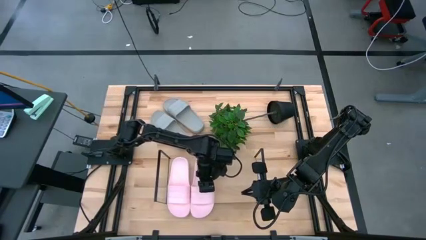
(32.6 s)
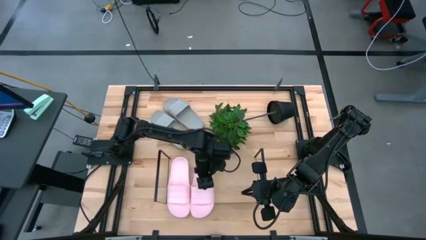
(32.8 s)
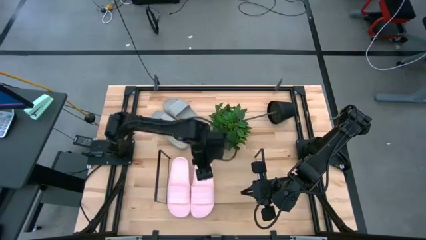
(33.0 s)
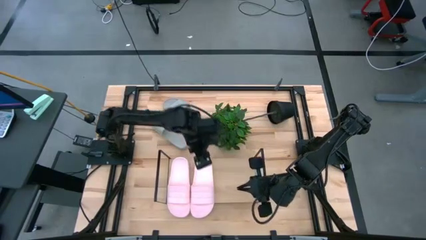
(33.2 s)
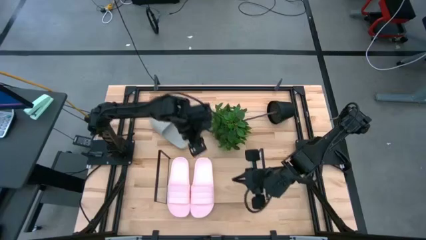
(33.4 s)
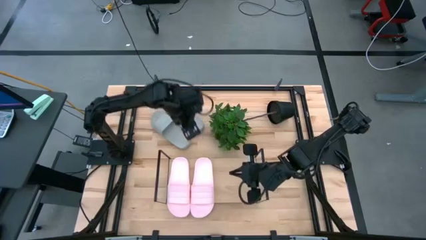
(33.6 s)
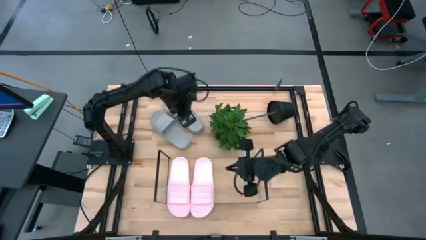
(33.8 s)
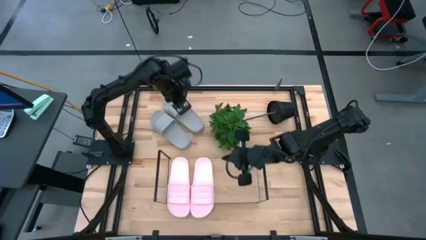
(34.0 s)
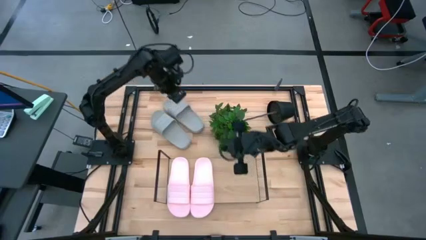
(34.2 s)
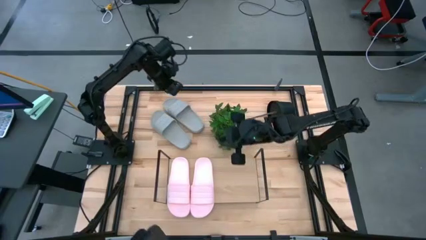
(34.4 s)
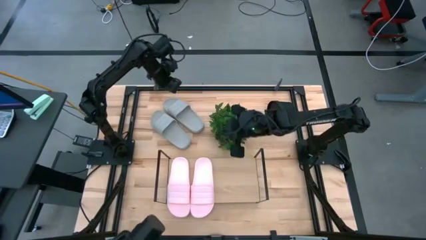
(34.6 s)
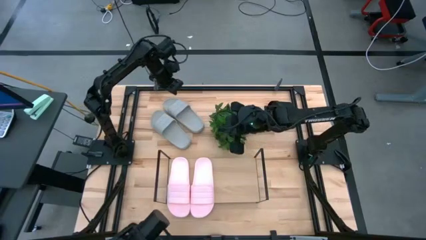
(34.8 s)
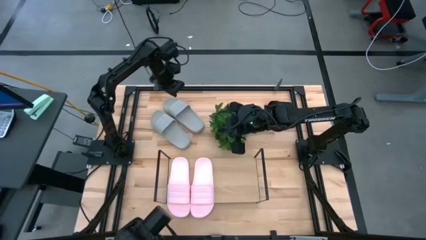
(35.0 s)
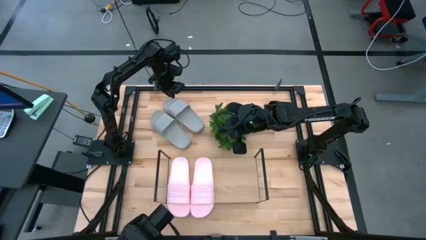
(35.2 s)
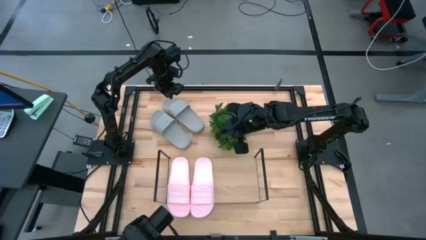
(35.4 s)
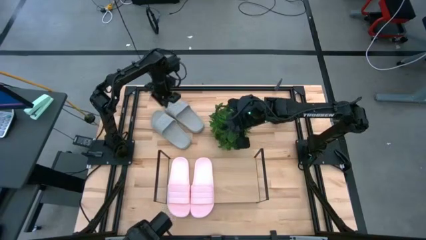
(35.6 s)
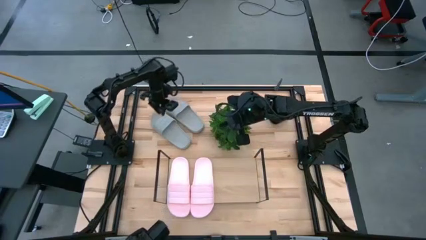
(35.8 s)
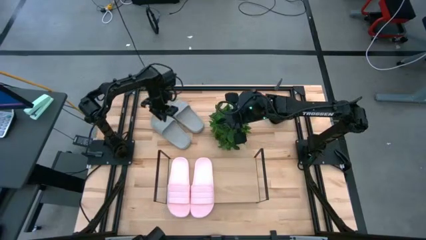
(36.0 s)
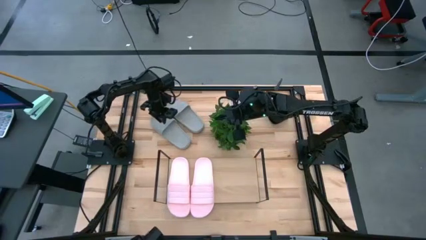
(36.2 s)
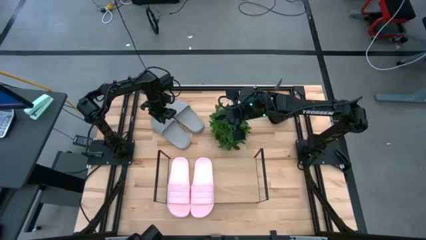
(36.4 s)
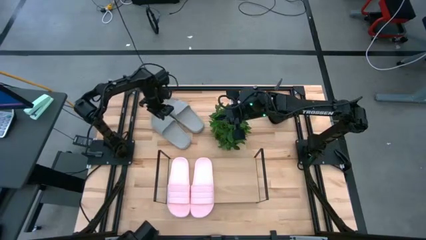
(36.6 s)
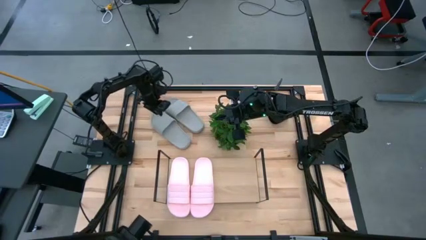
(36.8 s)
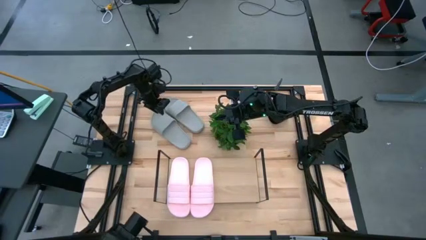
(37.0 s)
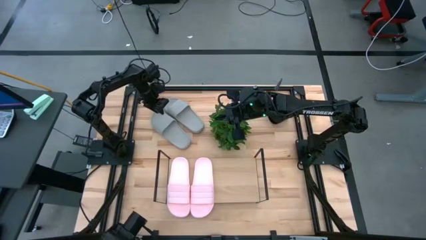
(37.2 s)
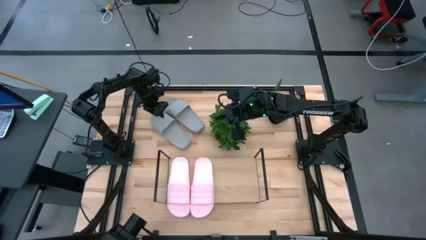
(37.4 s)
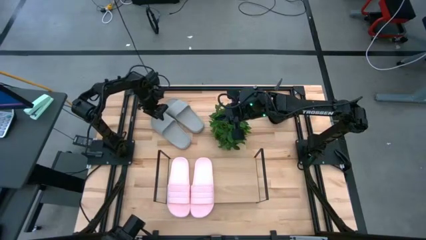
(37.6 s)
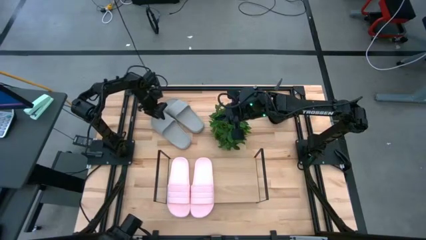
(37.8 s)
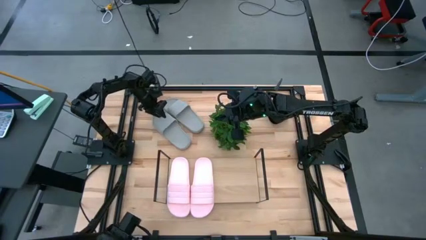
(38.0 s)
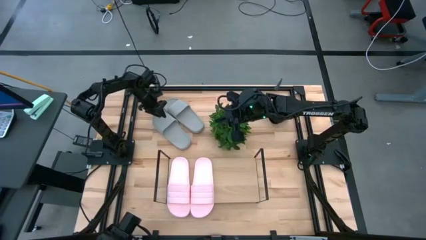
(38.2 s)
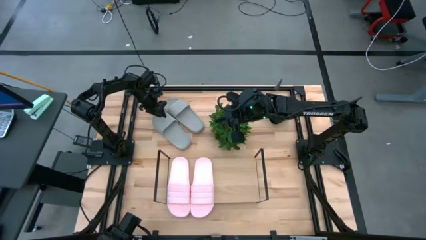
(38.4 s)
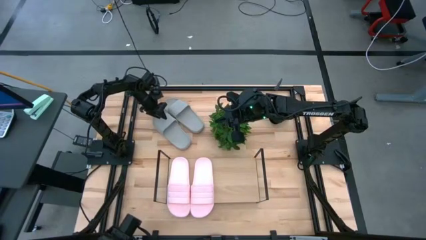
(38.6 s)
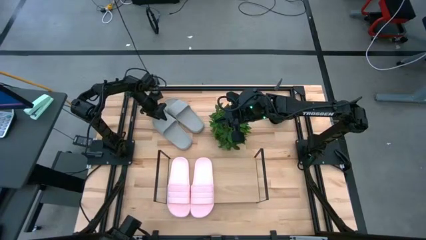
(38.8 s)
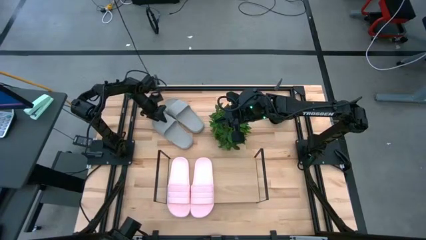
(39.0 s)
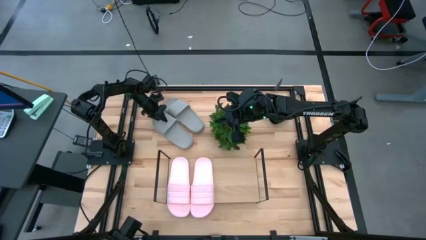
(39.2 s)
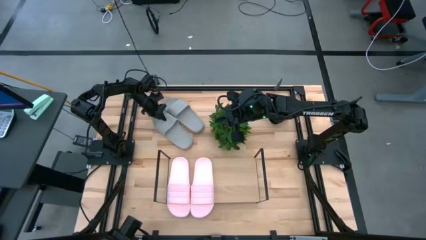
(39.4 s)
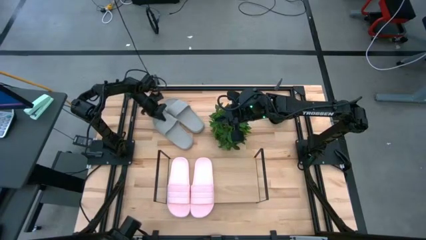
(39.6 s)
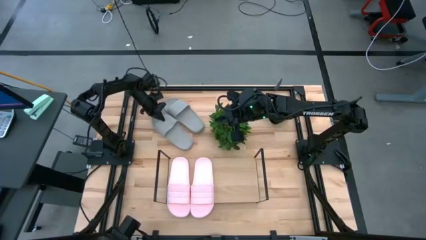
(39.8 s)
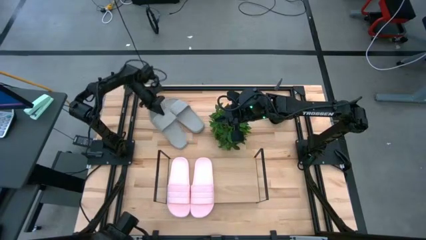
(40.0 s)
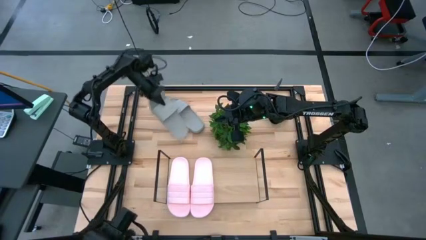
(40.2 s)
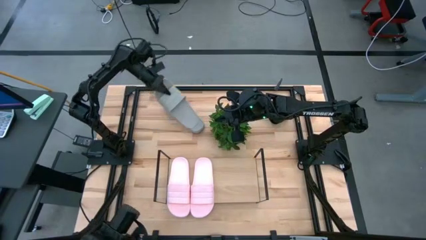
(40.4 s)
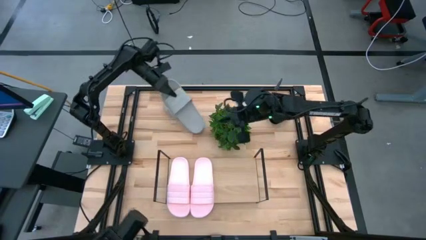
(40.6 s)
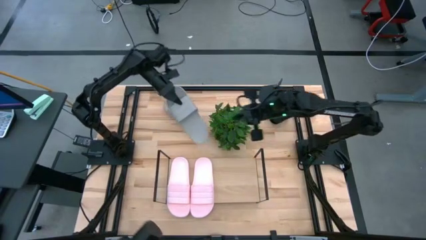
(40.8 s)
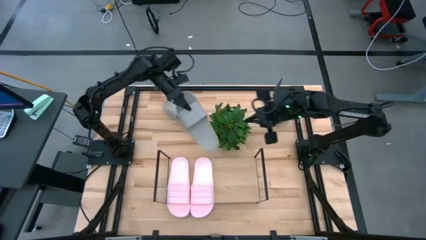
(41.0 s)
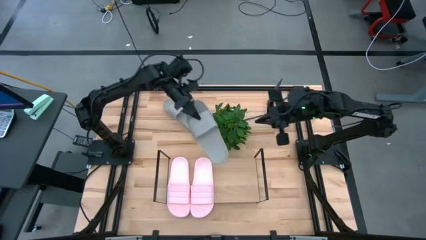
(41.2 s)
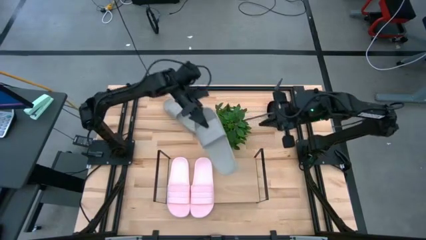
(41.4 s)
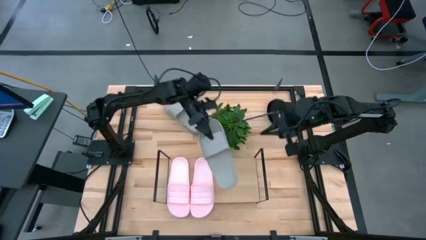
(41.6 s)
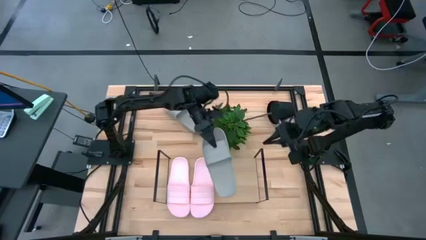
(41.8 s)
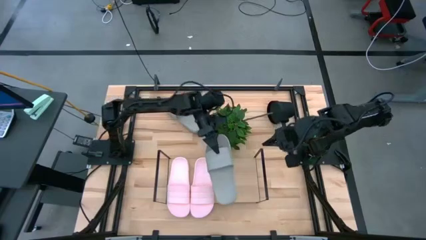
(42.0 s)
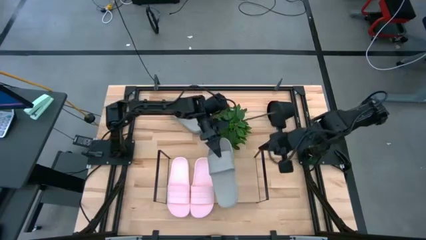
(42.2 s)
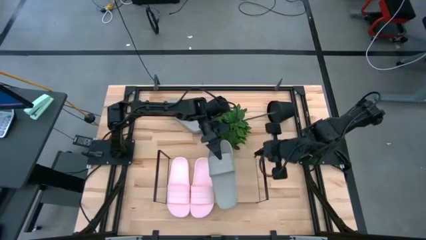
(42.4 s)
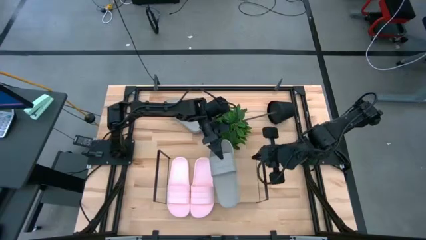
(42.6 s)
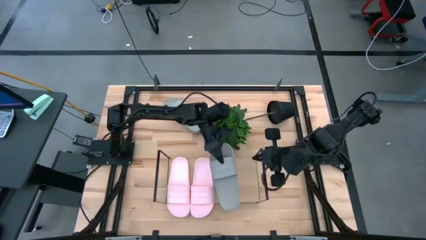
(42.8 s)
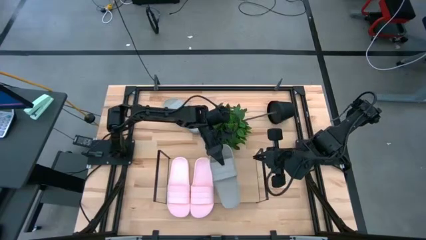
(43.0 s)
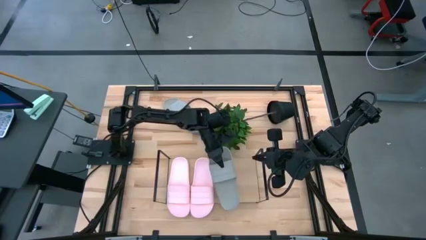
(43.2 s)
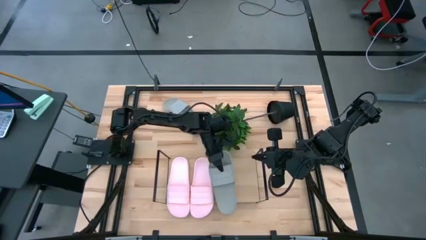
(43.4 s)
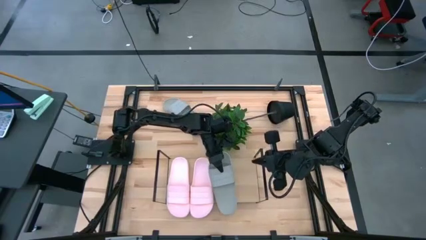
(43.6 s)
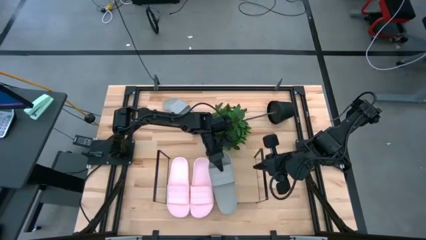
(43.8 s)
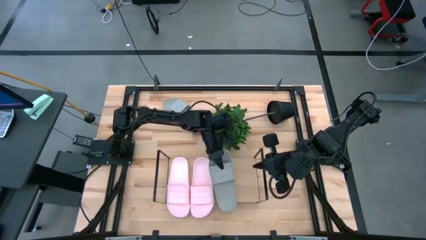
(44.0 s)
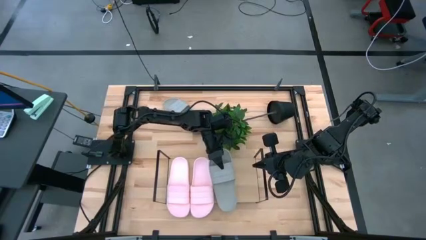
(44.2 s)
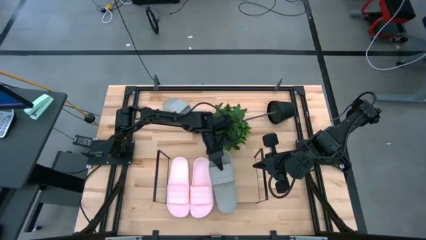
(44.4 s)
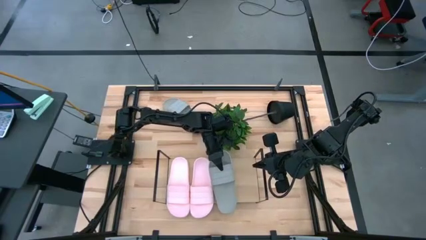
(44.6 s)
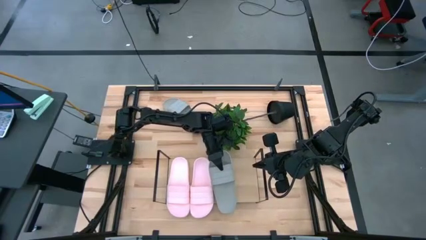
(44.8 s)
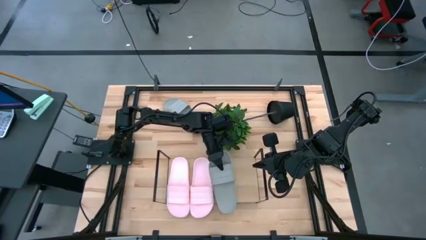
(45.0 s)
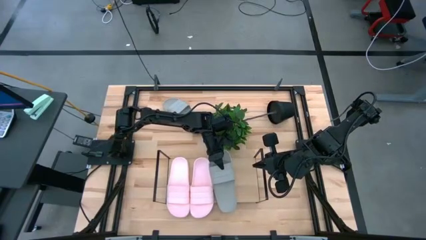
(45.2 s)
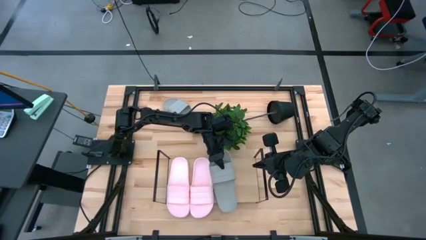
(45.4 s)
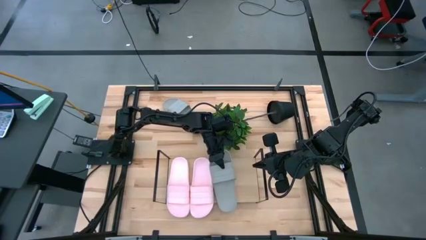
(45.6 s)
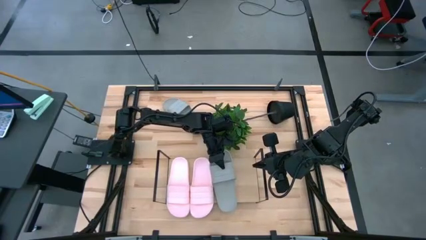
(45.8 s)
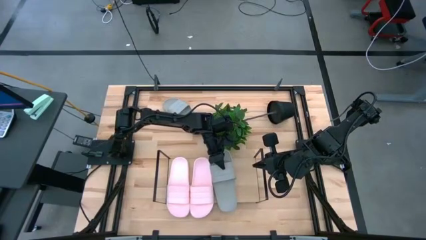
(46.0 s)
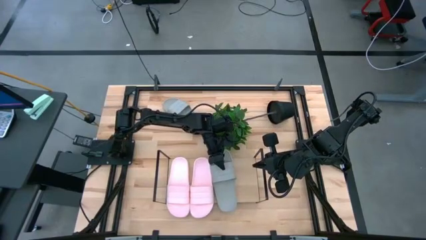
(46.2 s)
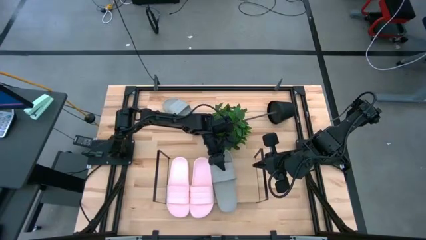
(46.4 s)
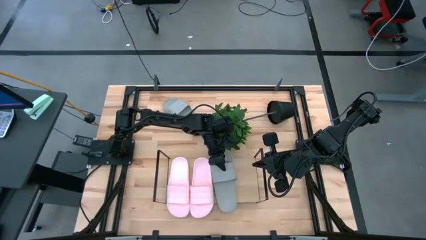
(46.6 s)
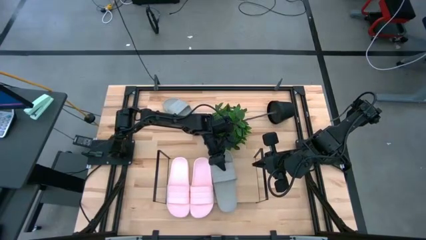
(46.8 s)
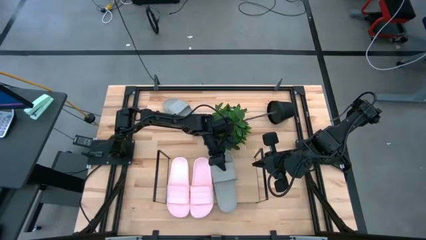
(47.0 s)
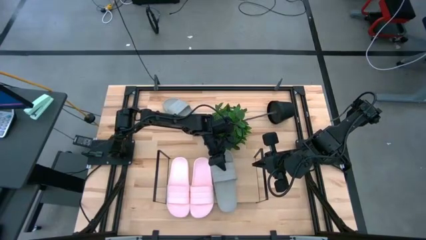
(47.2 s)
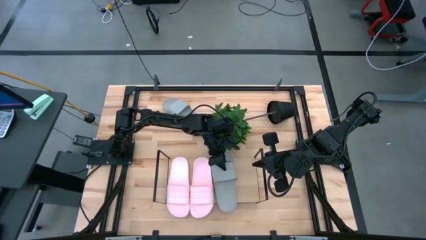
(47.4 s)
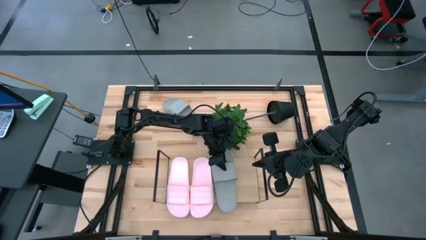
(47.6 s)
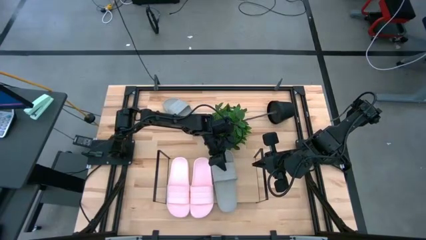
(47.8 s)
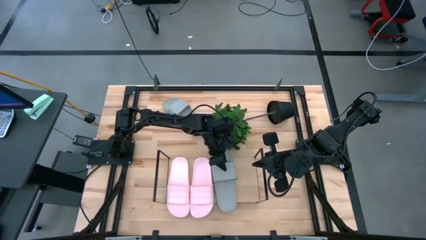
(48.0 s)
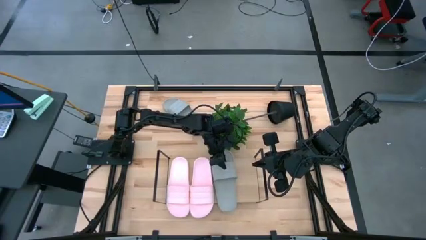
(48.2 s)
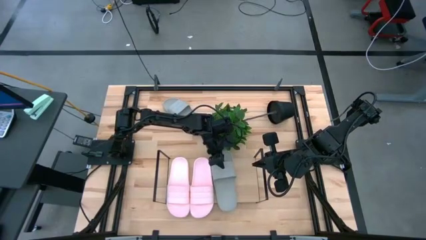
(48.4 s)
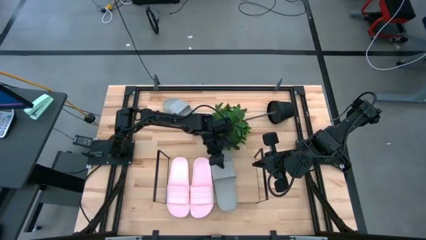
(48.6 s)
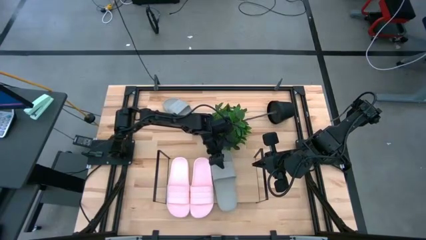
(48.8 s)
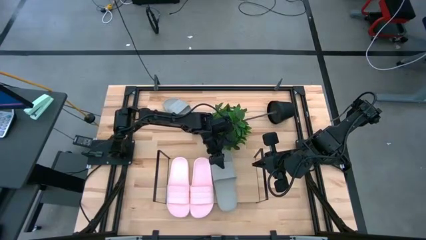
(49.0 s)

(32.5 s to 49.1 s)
Task: Pick and place slides into the shelf
Put the left gray slipper on the shelf
